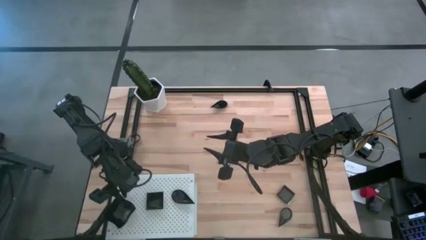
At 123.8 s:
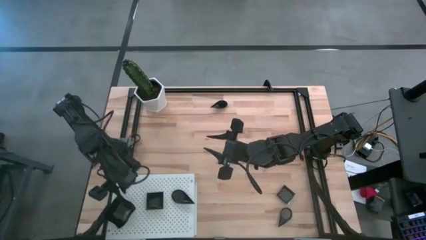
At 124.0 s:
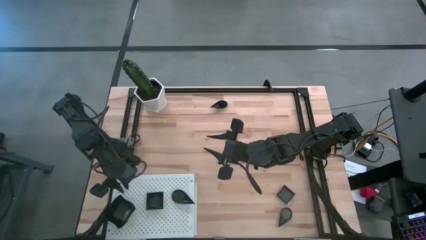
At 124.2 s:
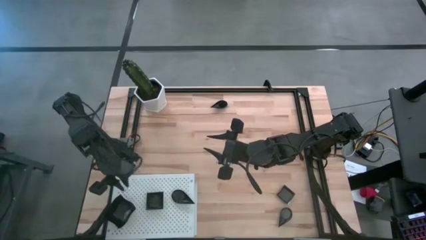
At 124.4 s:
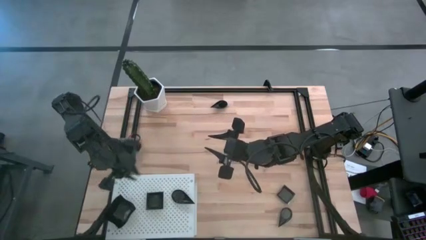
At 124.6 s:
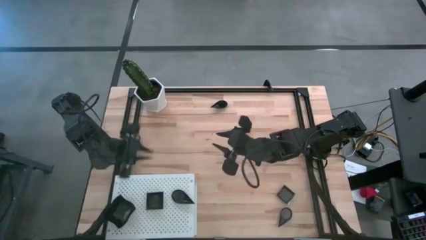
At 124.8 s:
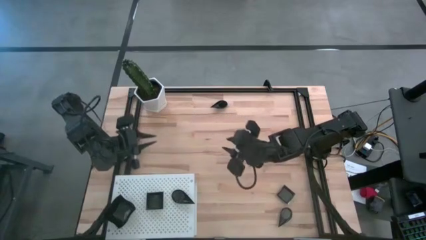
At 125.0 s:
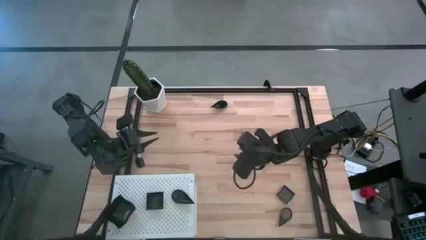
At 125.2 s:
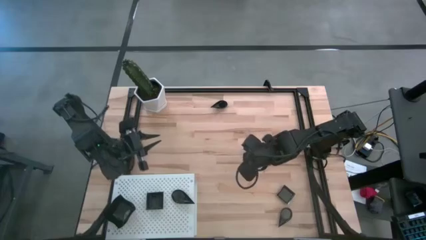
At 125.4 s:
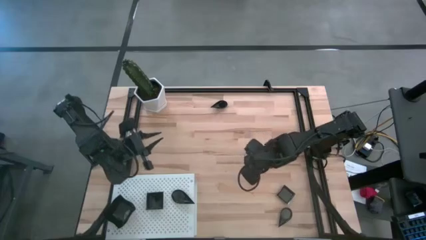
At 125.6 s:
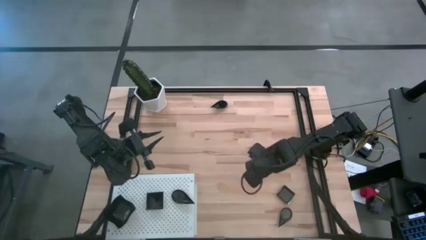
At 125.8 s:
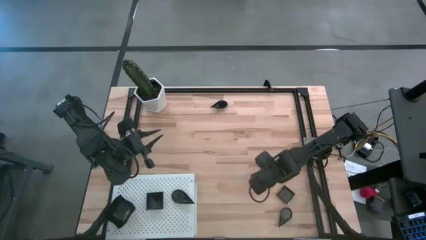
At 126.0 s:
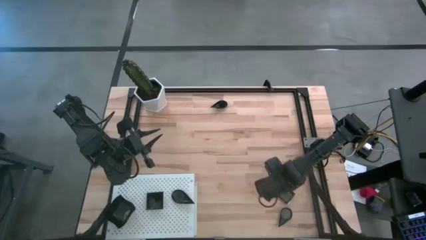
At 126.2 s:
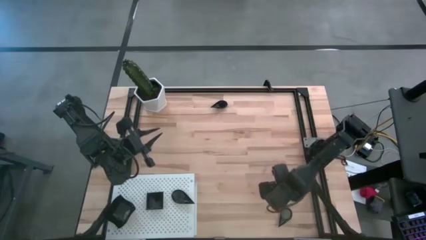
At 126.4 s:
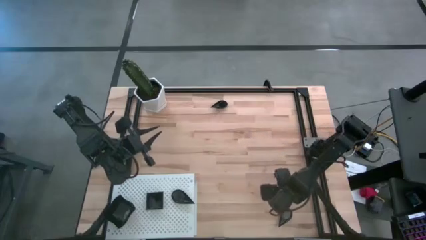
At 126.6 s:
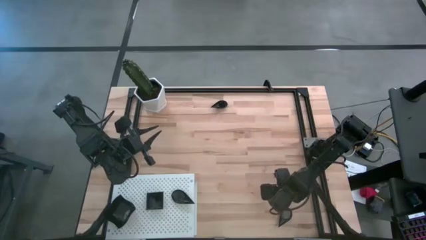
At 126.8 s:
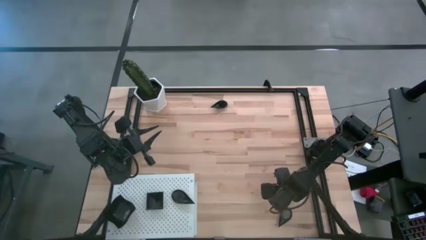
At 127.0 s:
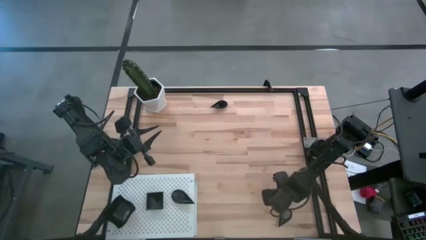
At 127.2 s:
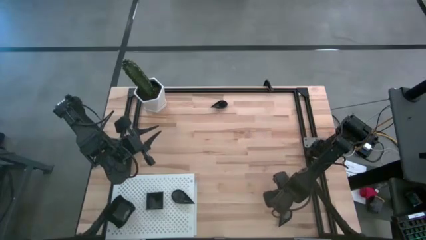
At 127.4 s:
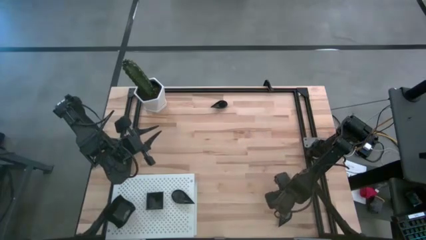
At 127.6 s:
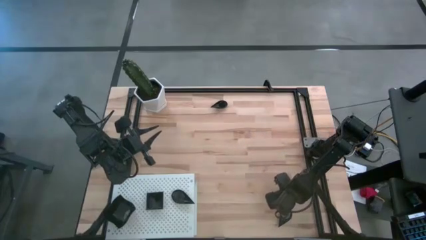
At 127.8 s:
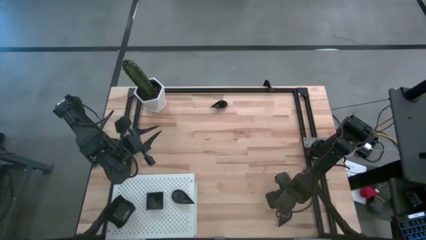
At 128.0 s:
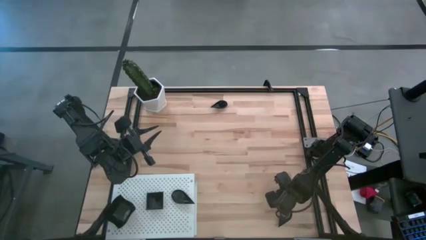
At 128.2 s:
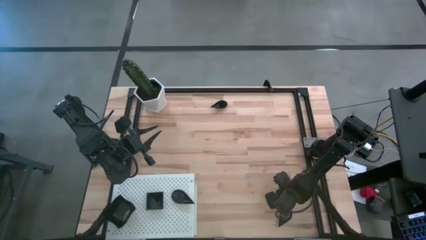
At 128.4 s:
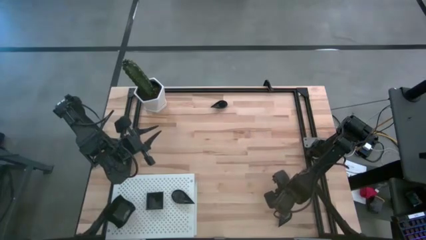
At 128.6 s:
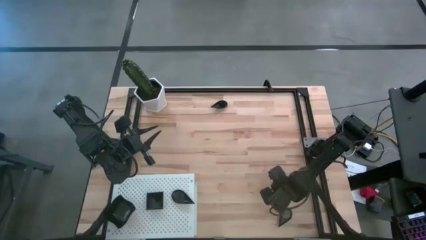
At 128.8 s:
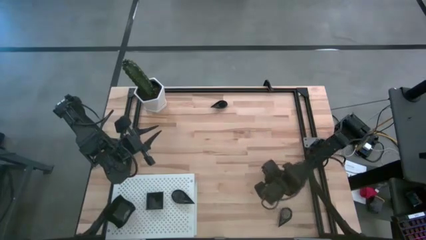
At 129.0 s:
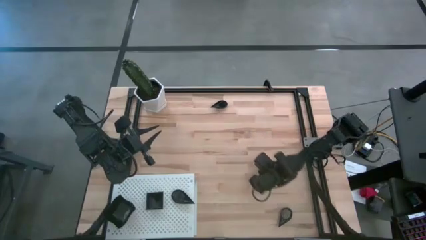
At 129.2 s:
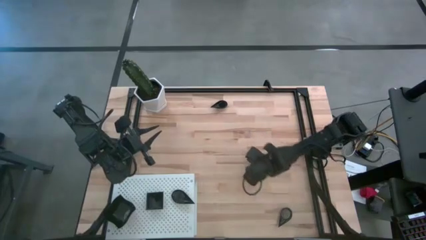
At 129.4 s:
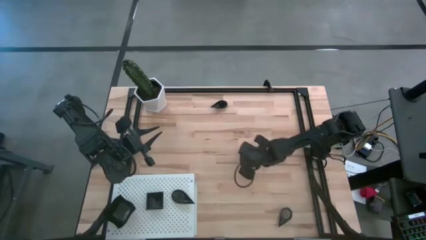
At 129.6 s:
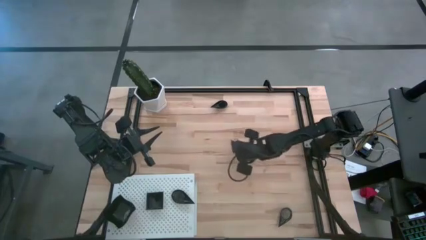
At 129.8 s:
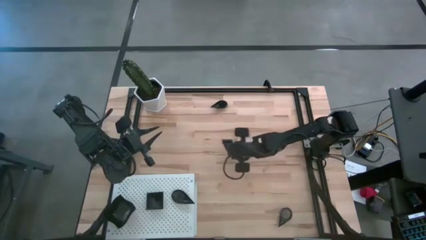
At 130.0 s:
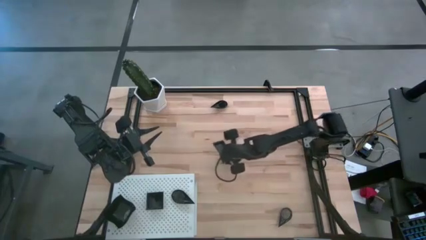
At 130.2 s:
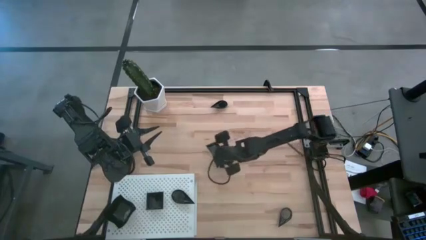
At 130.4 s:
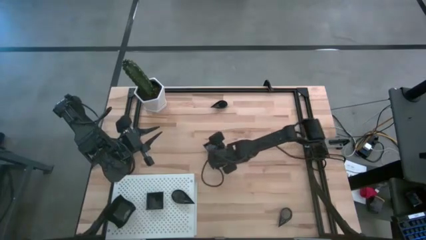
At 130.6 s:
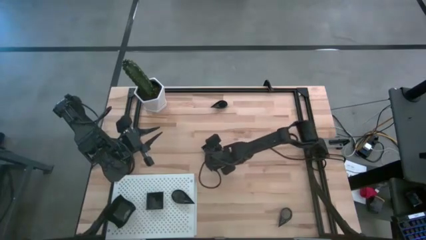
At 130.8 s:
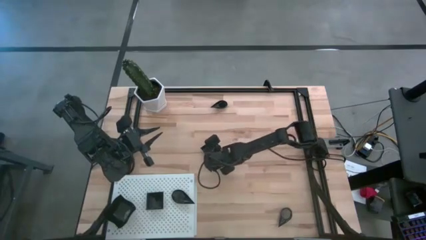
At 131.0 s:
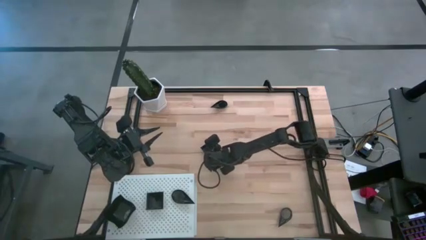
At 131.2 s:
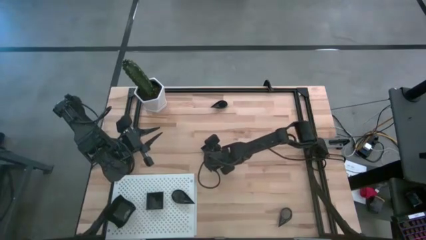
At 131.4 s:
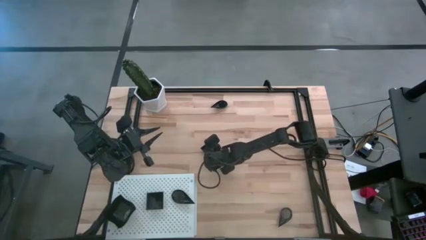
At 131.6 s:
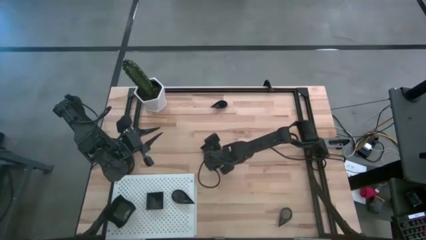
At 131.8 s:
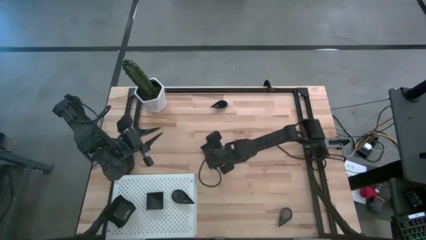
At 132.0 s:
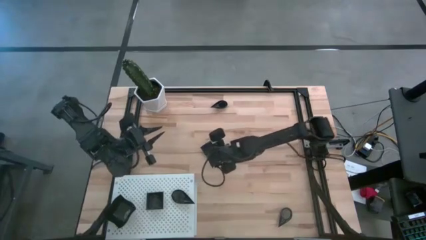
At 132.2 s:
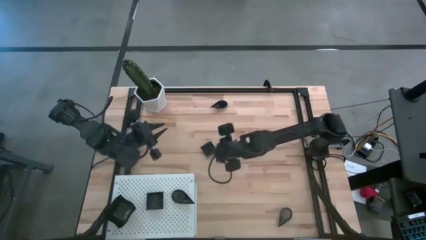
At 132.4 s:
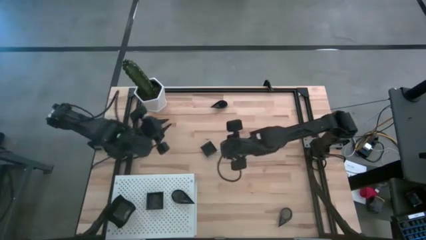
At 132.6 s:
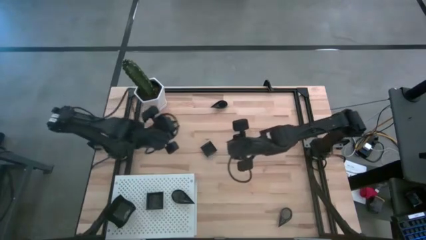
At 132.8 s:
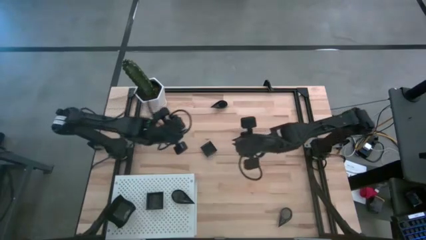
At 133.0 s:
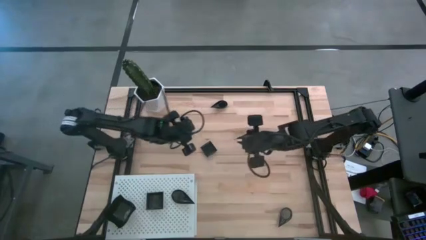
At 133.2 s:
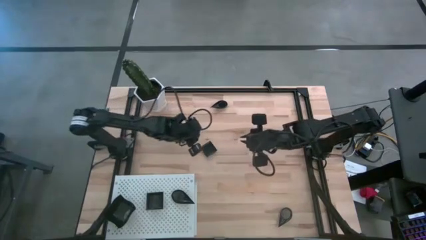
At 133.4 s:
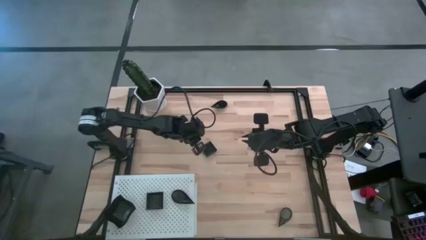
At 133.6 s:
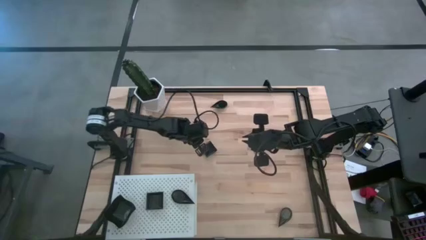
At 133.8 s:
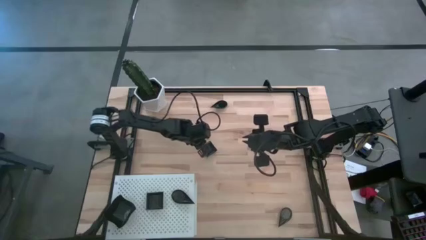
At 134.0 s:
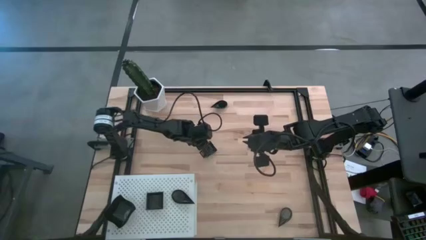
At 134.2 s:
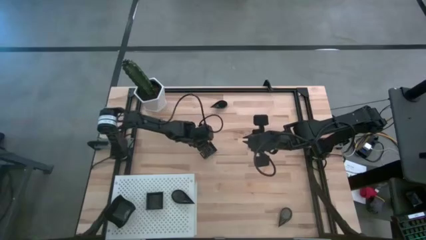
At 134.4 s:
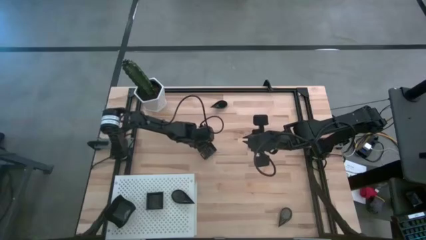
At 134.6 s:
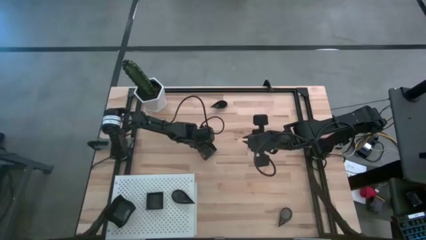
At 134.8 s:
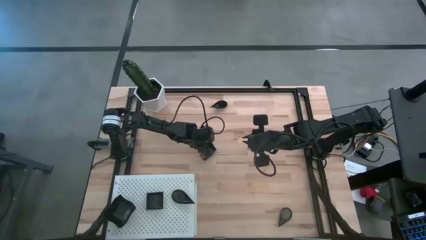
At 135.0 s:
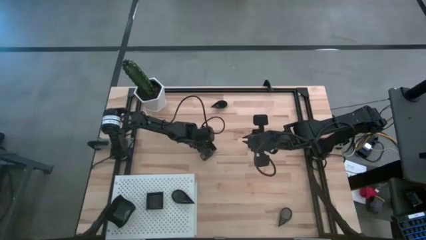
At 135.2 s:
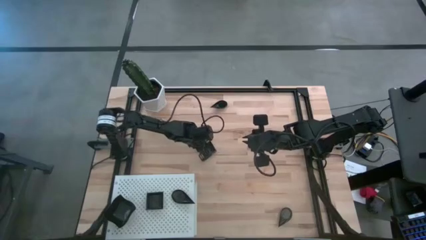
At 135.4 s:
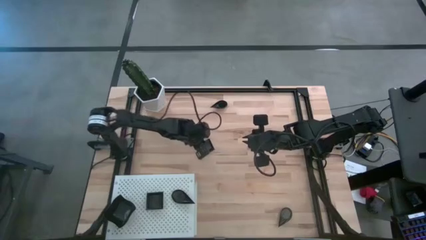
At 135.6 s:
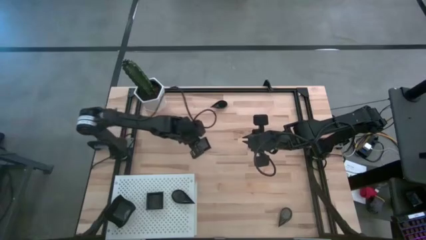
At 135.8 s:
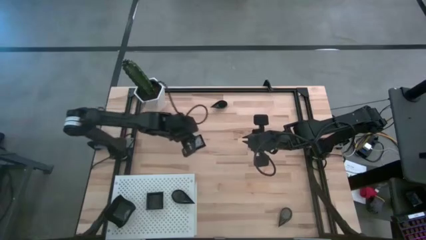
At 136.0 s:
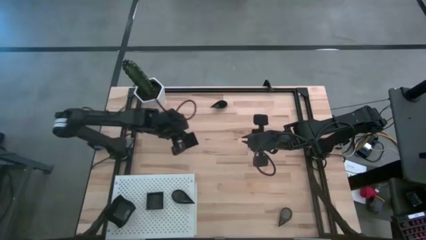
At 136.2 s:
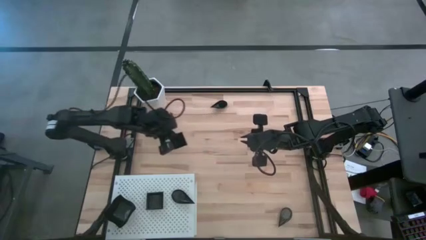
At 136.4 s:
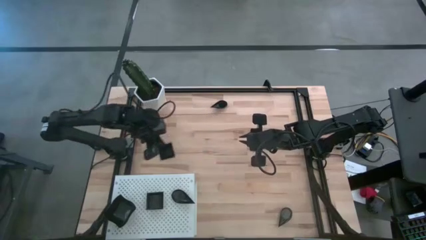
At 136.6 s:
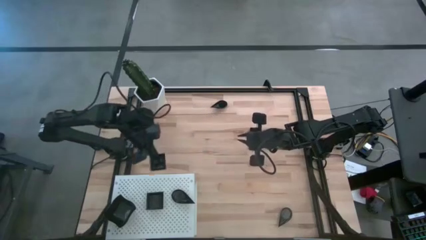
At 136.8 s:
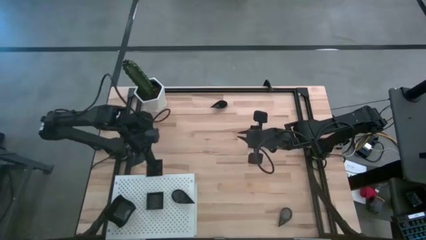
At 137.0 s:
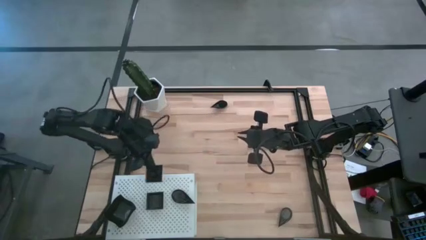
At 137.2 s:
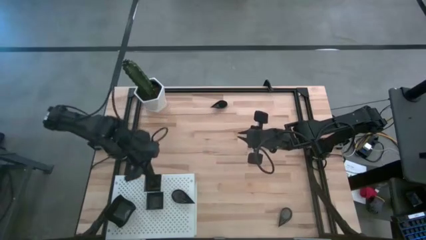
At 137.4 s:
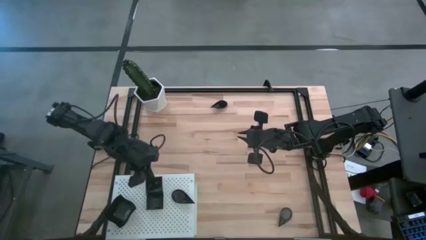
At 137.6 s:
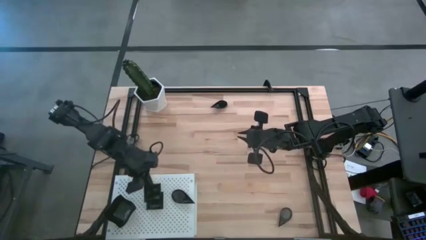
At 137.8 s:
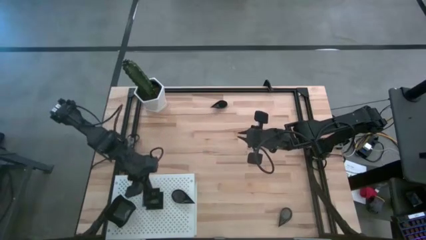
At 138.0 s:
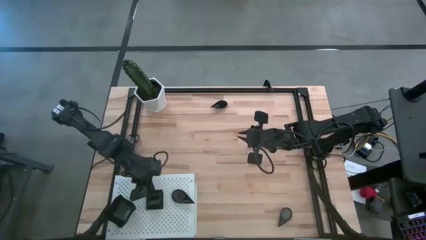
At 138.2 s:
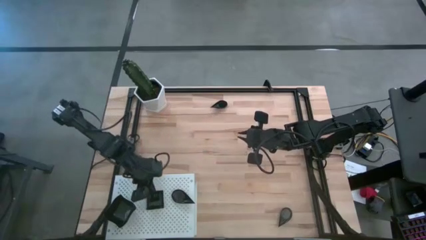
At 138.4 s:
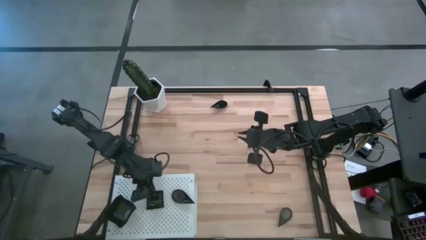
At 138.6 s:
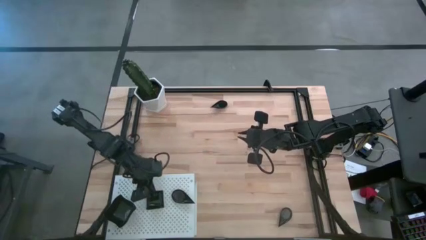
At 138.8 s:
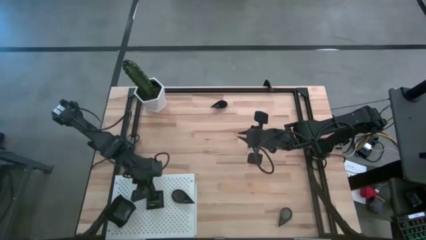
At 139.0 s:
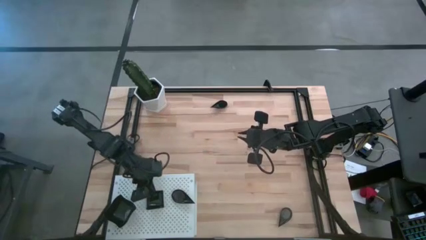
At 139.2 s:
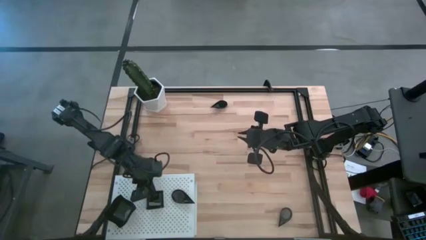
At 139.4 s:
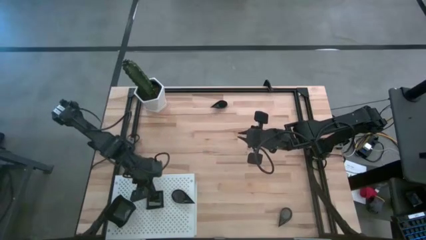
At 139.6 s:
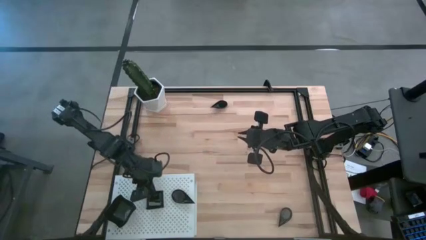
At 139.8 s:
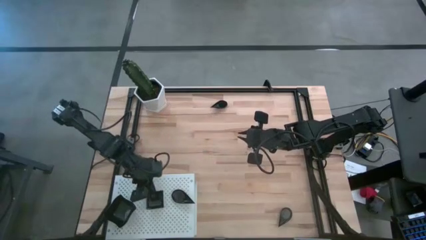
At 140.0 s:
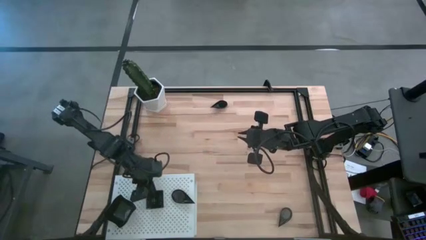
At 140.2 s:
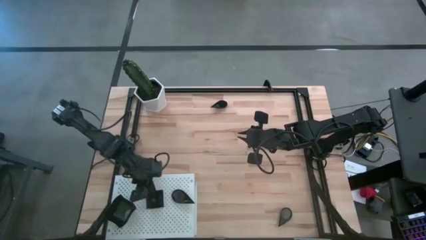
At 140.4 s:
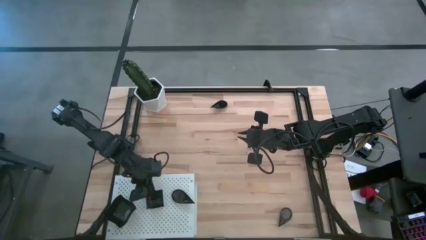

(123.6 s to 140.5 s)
Task: Pick & Place Mini shaped plates
Stack the square plate on top of the other square plate on the shelf
